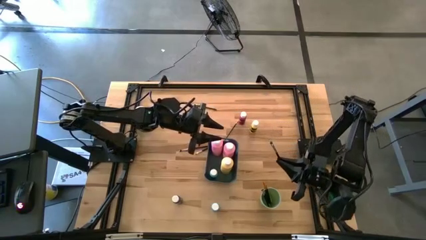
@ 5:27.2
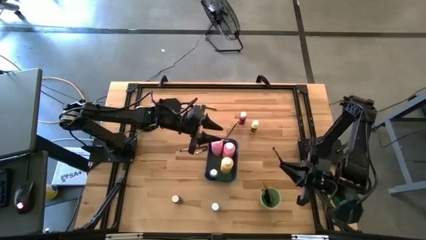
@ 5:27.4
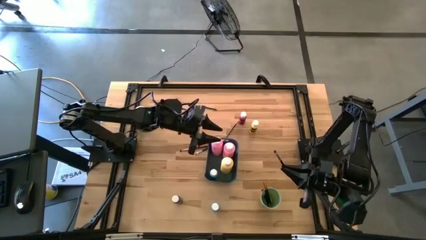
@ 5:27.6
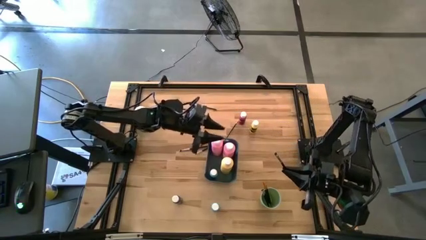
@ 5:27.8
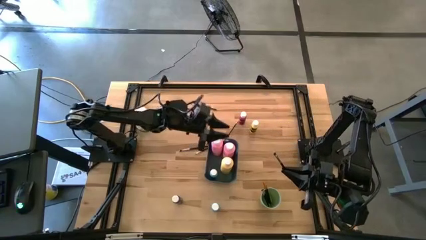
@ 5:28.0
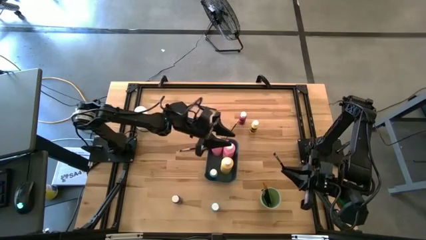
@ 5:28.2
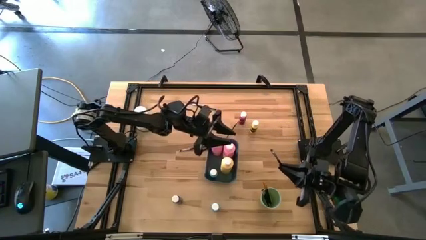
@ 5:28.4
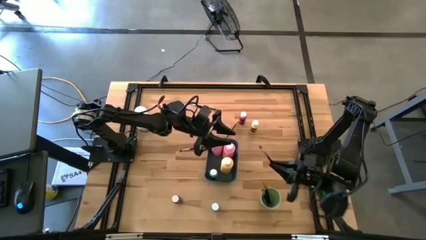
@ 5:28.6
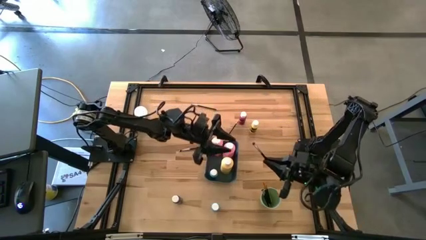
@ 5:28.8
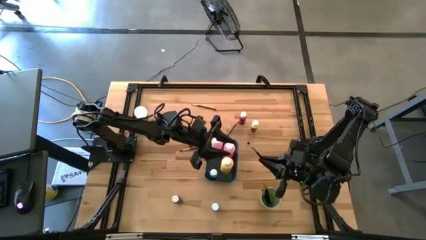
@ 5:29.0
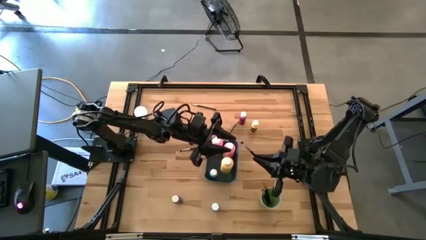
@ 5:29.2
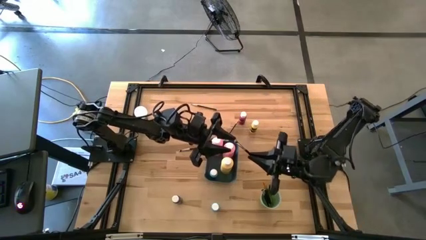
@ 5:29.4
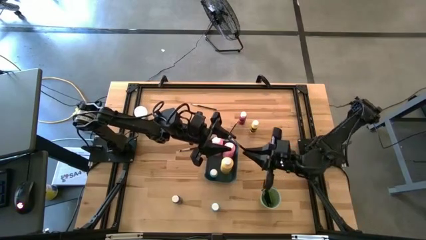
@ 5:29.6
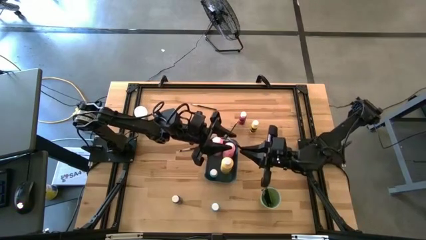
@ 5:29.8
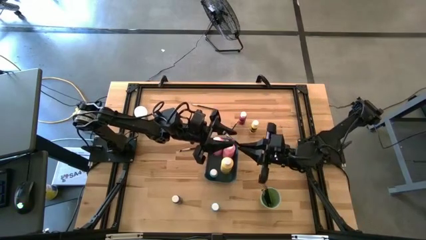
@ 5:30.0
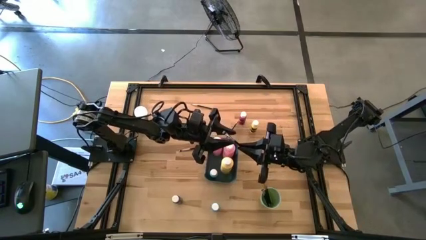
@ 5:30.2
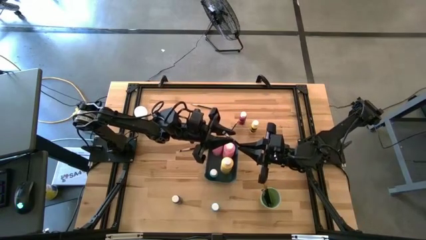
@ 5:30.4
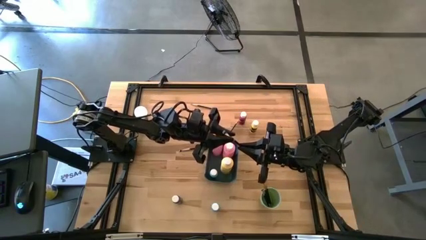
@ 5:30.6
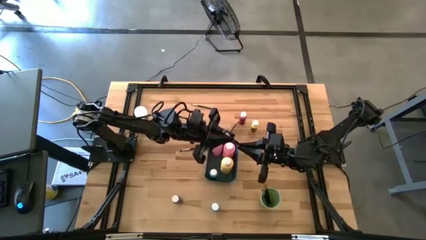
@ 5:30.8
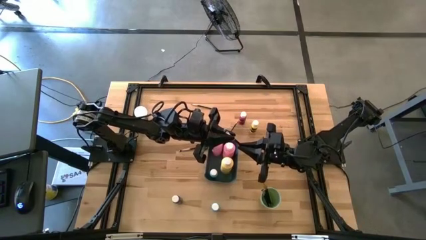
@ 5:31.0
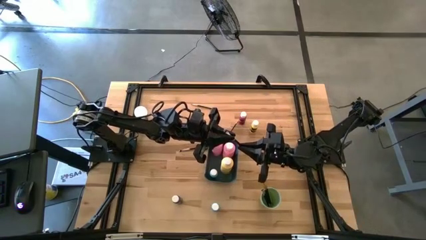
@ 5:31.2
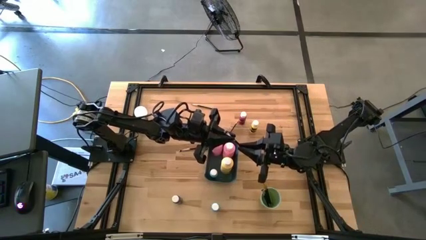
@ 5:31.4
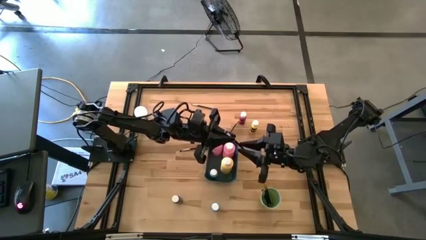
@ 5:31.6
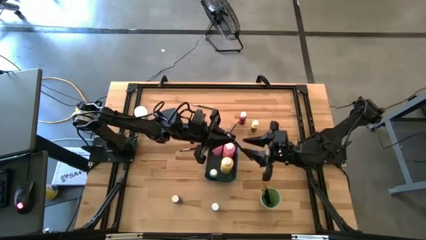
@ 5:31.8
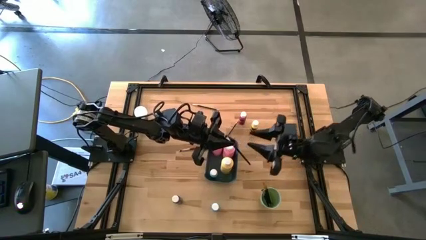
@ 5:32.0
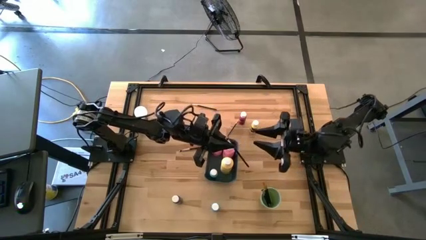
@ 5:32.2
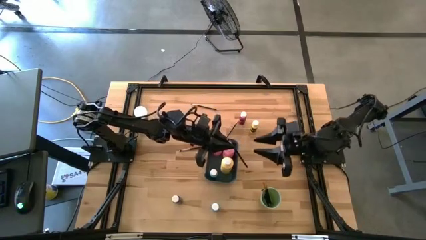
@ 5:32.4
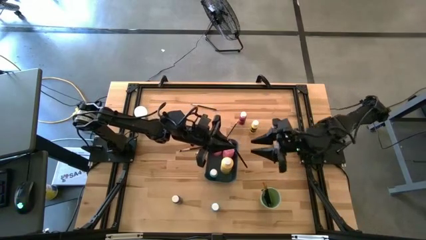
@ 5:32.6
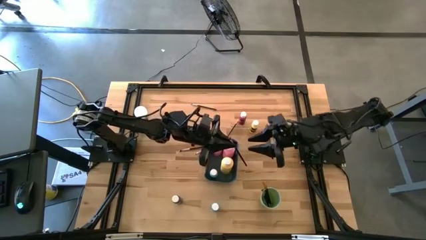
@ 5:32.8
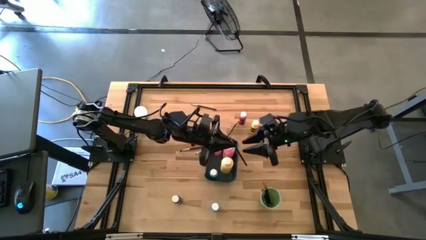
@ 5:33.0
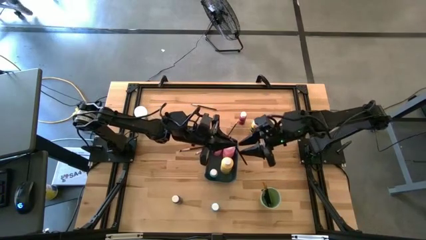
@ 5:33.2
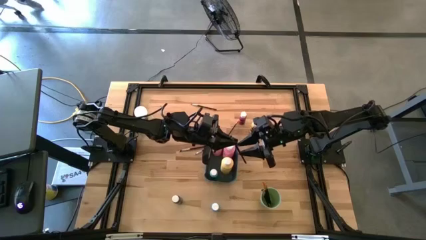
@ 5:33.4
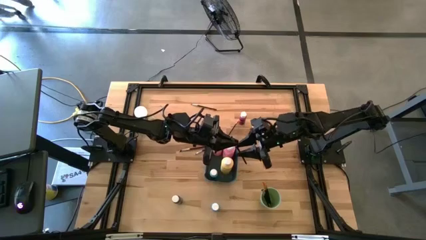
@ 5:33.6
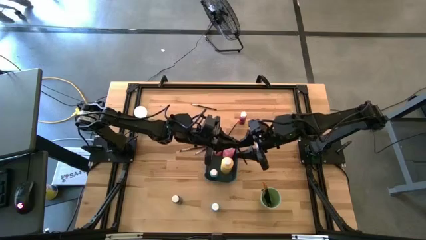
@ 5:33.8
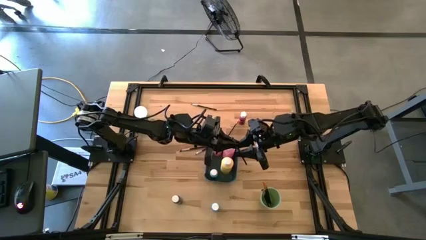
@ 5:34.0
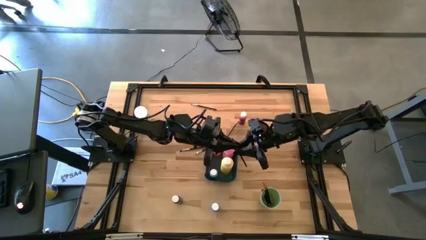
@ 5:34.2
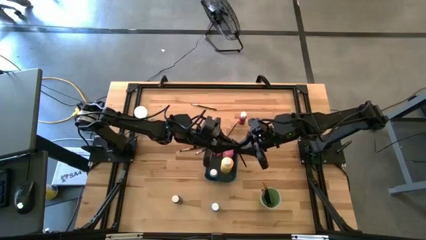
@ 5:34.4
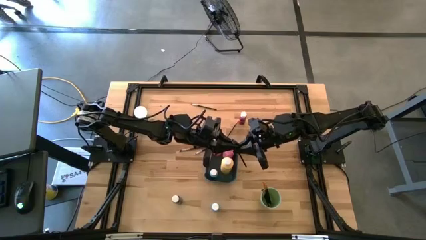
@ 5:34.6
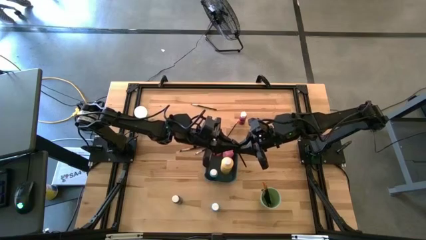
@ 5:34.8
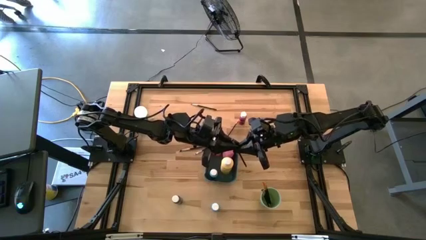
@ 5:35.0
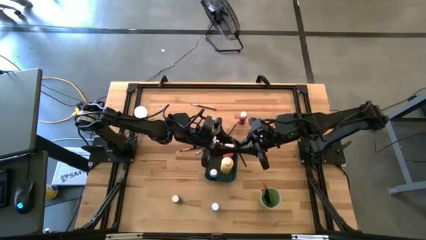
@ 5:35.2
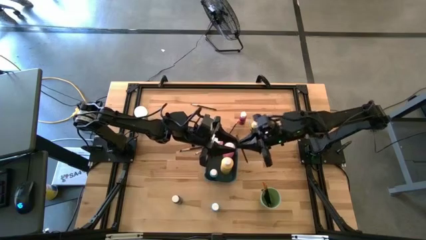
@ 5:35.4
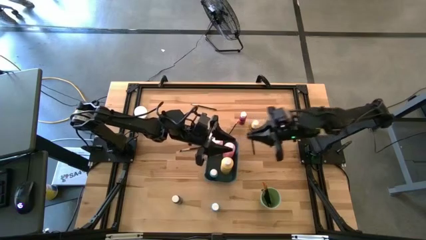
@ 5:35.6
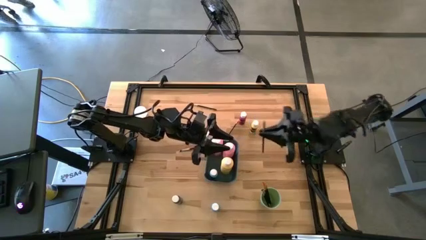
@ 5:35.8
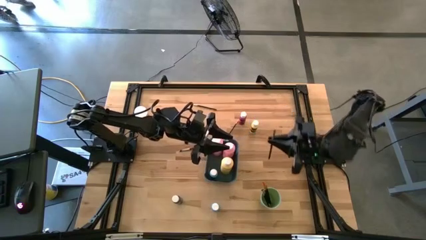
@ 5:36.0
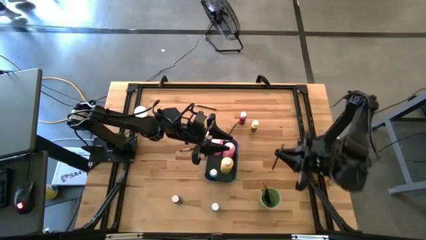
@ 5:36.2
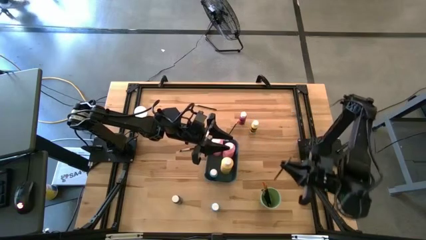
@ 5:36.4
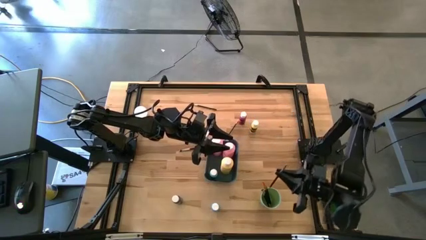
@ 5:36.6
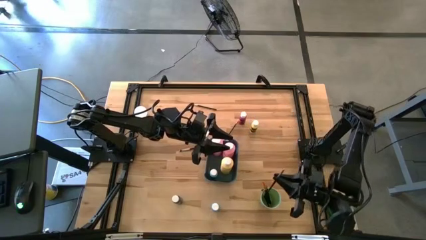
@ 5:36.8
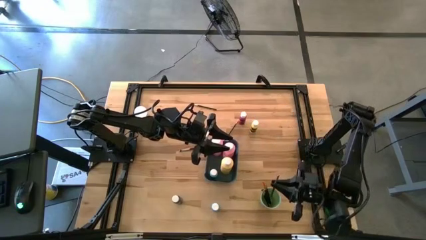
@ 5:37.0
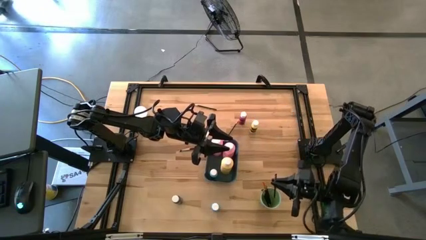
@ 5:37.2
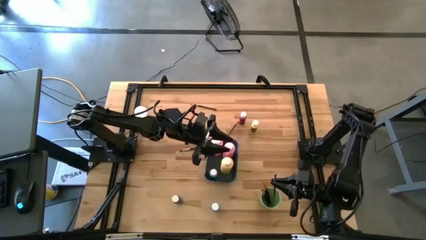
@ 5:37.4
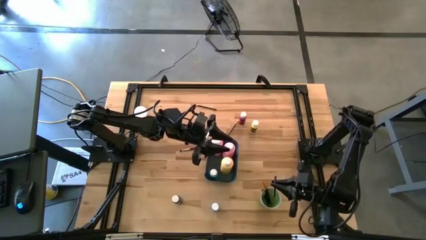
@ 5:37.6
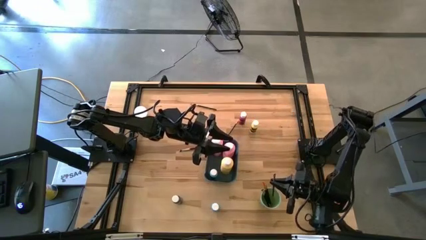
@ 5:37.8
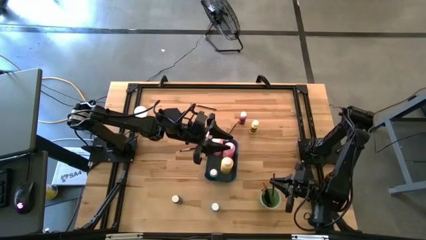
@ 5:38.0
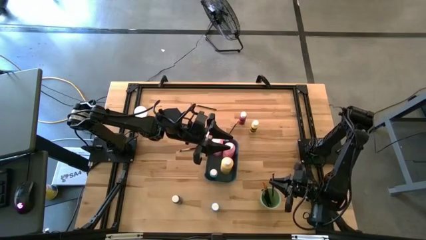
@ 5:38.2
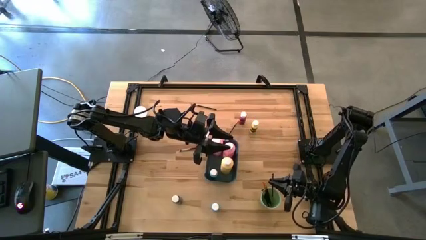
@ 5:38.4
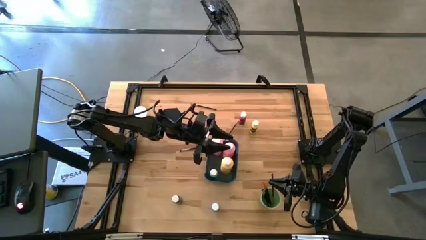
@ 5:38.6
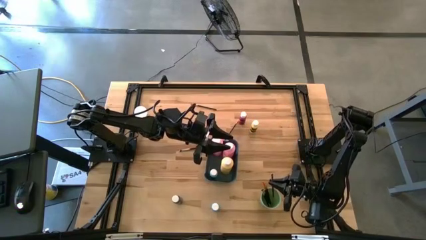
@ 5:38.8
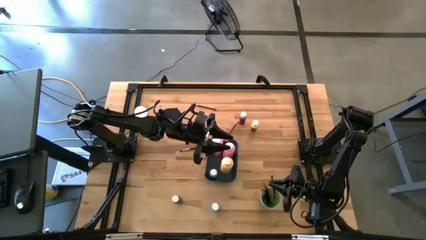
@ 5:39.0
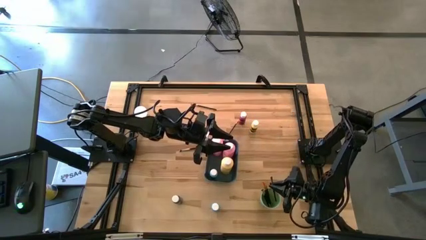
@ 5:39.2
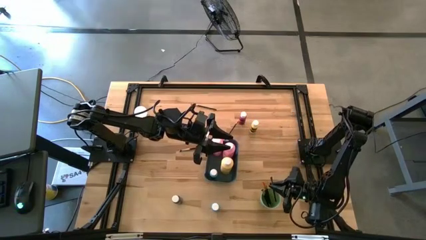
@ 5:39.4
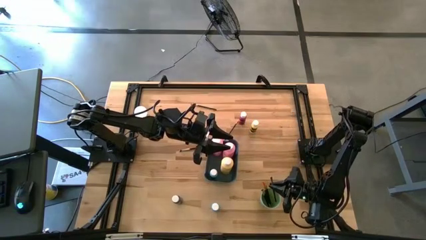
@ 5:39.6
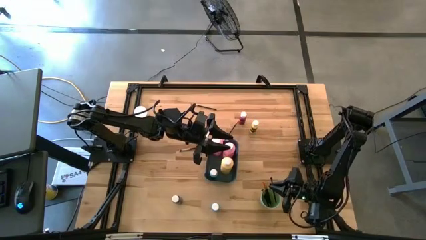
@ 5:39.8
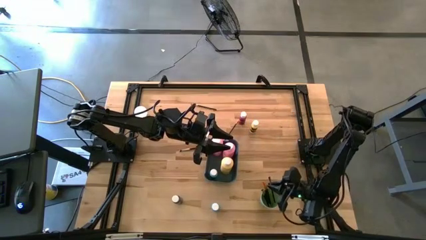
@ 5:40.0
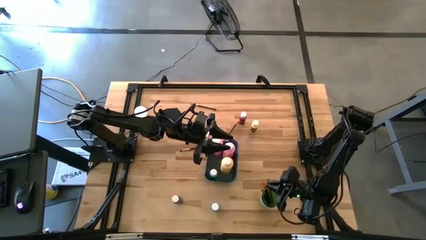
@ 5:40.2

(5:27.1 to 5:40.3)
Task: Pick & Place Paint Supplies
Put the black and silver paint brush into the green cup

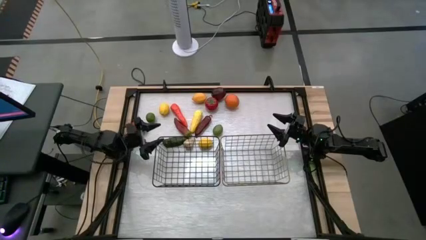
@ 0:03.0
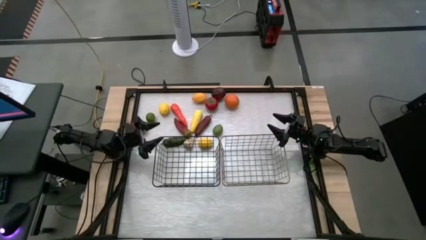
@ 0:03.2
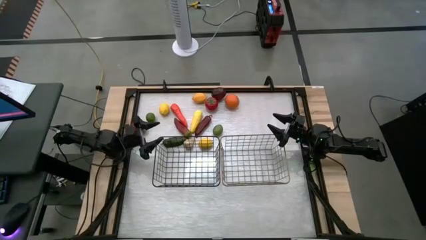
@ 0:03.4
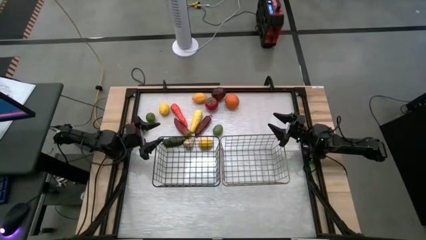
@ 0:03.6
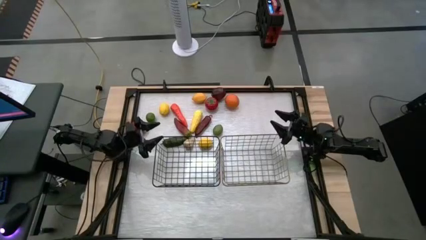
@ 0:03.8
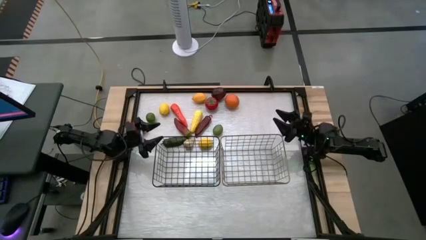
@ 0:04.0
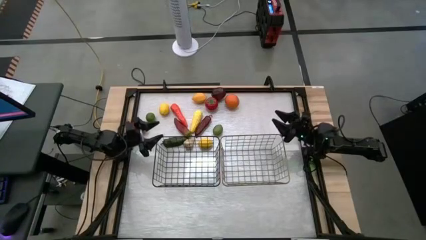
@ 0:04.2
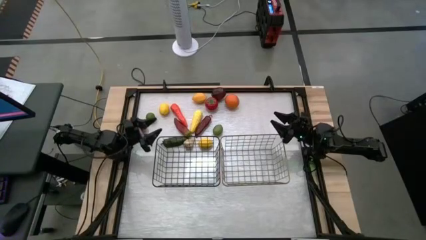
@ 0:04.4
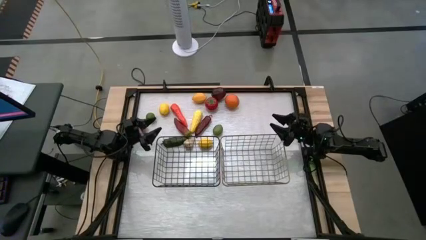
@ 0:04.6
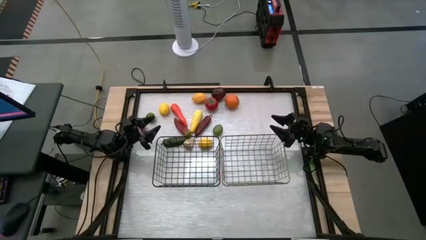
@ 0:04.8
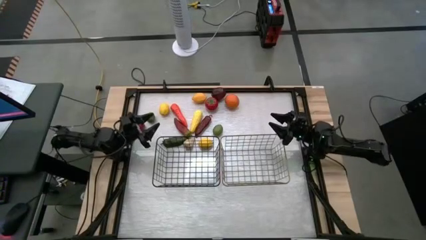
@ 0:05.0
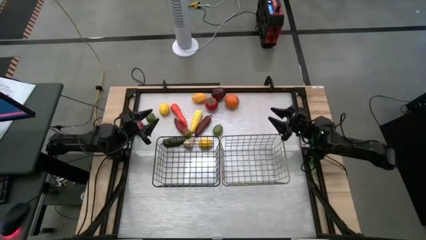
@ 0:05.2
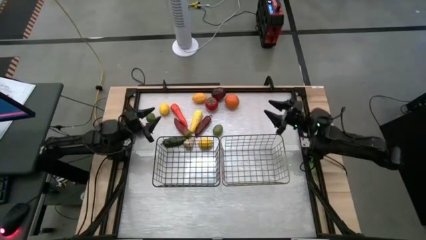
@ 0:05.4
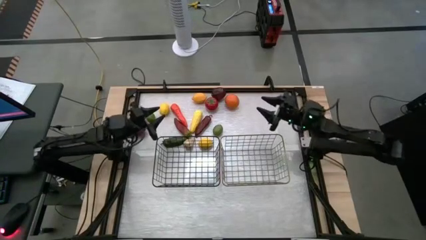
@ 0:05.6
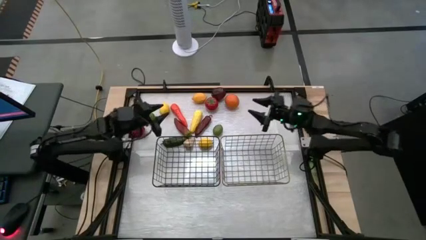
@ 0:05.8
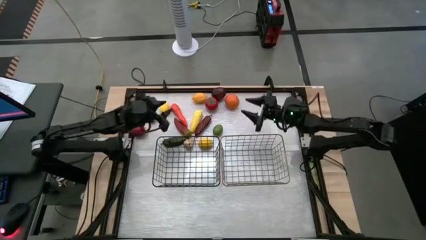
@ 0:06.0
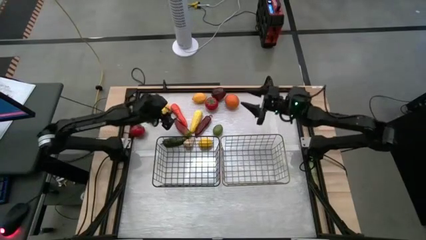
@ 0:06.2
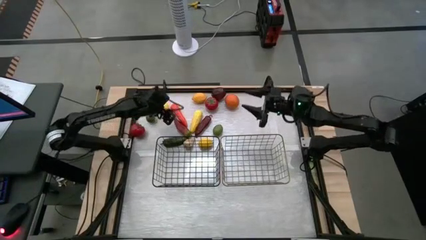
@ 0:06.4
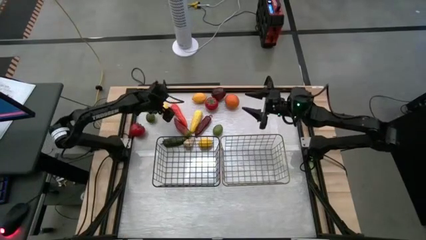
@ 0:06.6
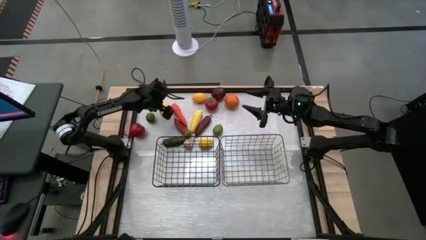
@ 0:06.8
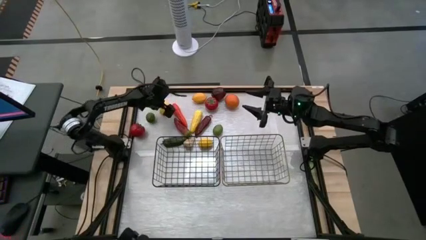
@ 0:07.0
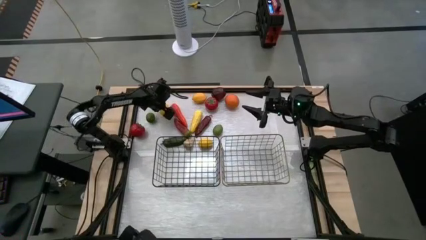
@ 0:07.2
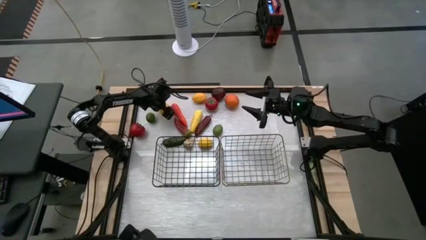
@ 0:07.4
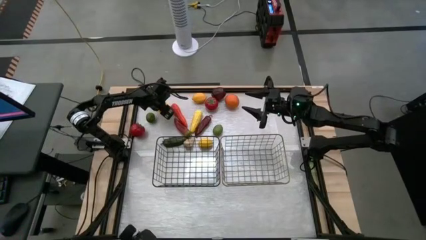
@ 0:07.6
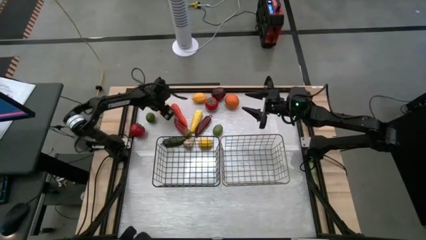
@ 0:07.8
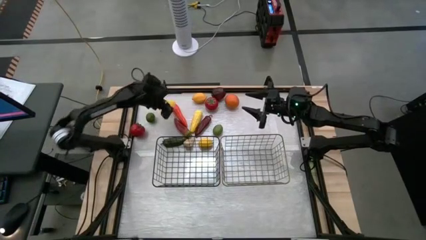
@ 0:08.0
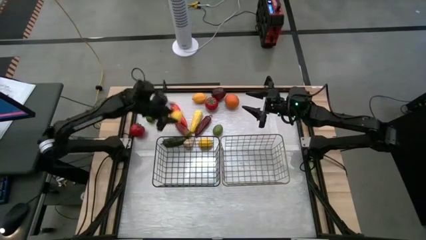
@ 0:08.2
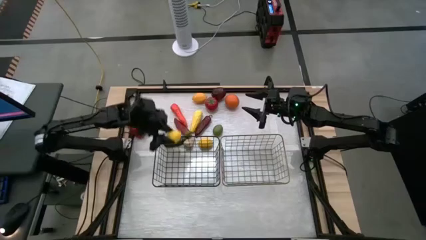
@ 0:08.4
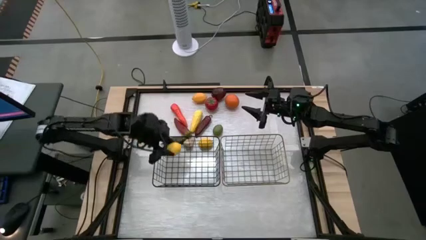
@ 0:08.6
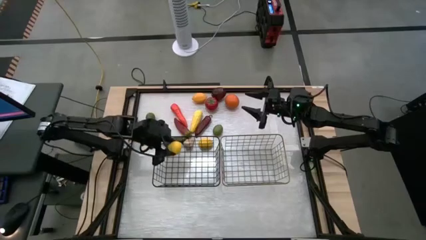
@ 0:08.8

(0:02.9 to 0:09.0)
Task: Sort produce into baskets
Put the left yellow lemon into the black wire basket
